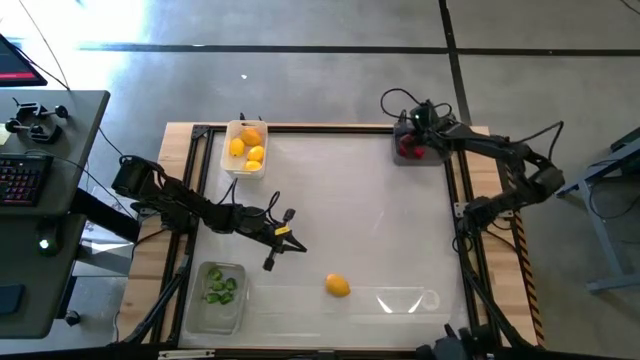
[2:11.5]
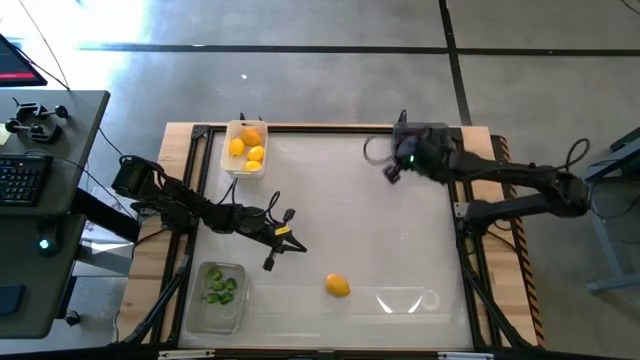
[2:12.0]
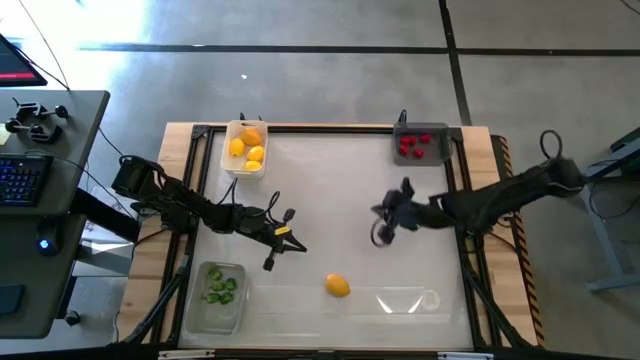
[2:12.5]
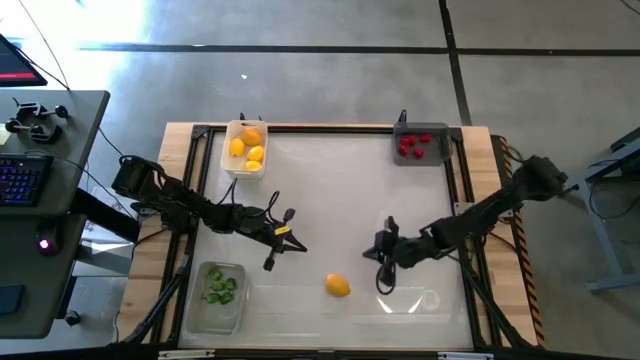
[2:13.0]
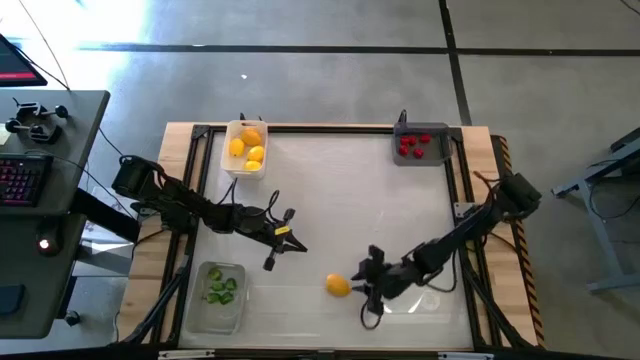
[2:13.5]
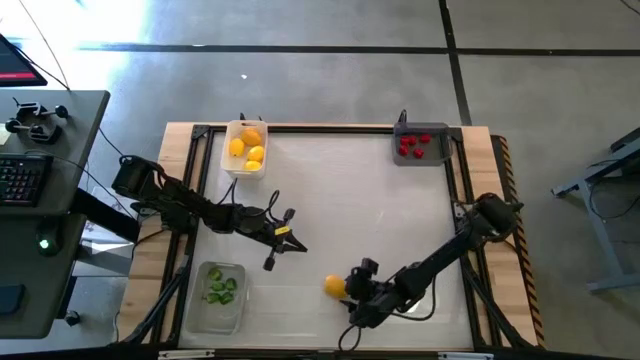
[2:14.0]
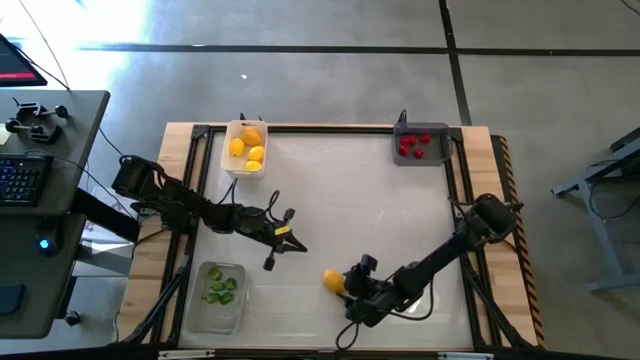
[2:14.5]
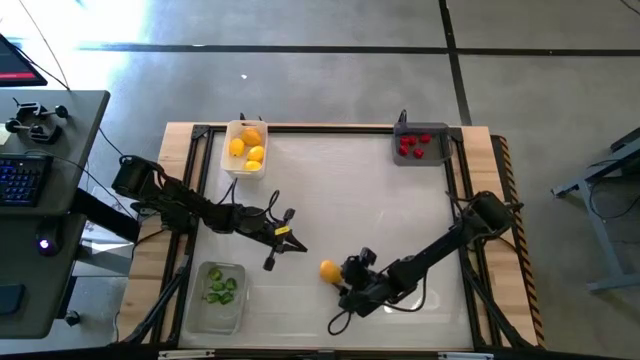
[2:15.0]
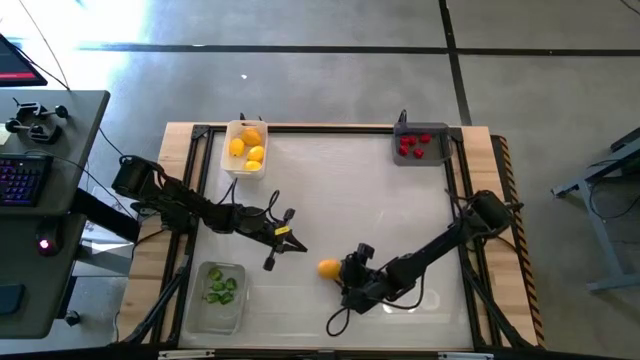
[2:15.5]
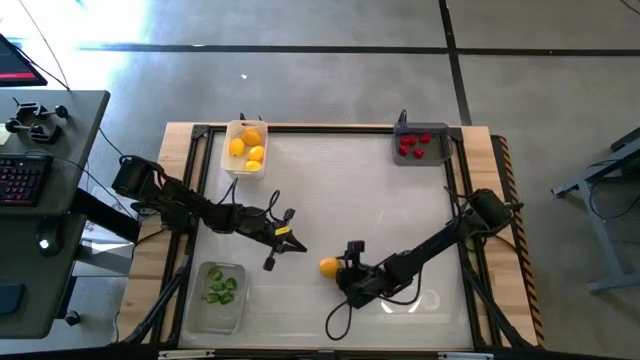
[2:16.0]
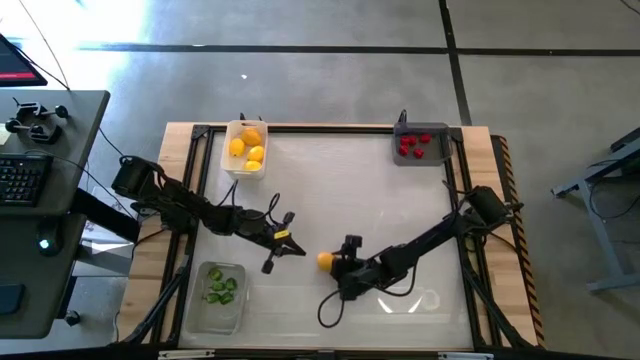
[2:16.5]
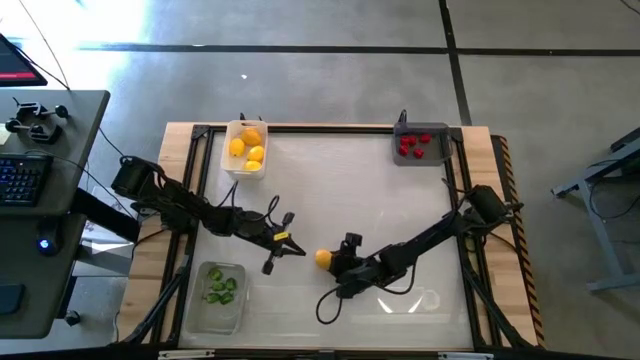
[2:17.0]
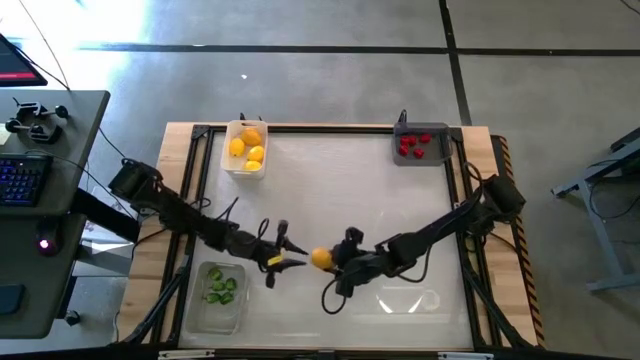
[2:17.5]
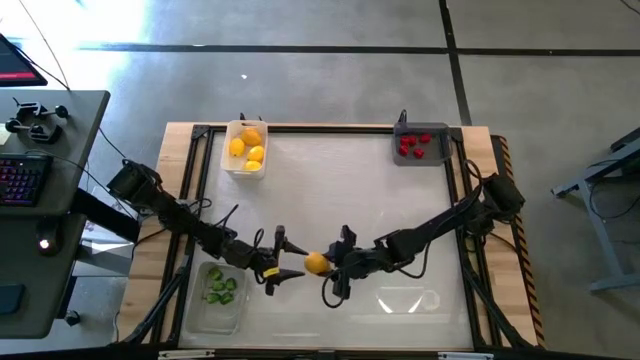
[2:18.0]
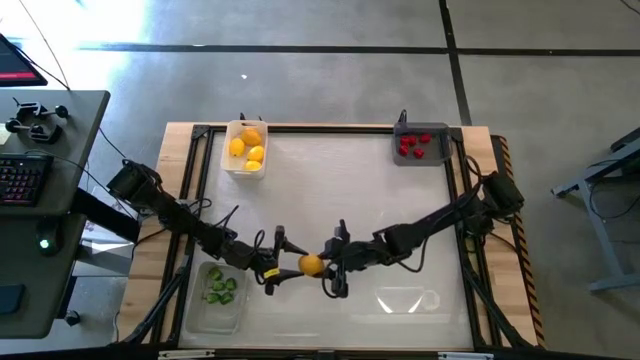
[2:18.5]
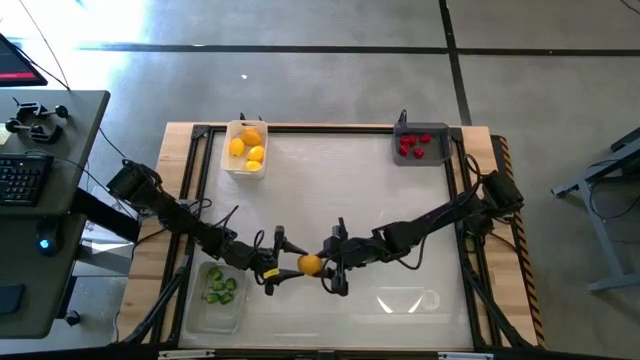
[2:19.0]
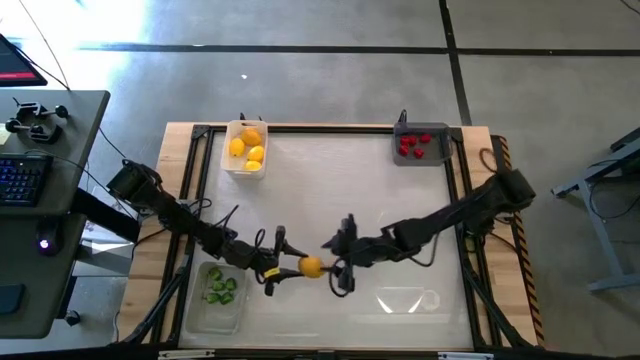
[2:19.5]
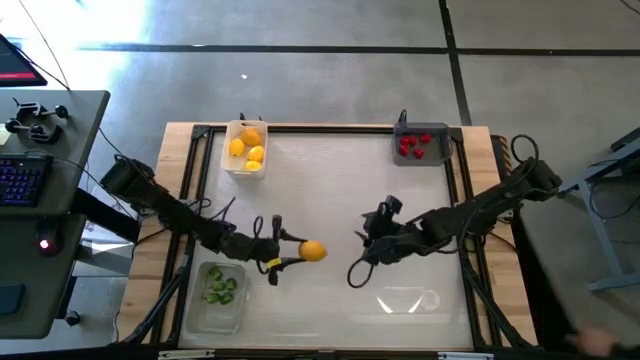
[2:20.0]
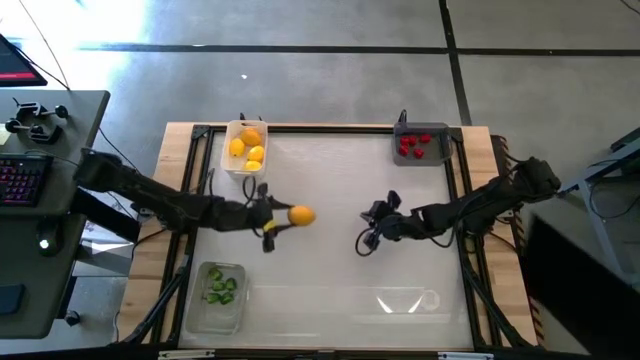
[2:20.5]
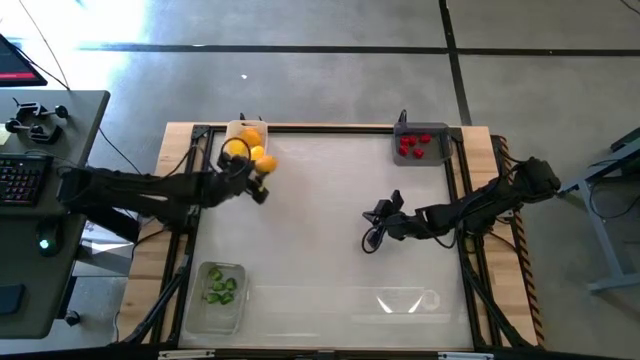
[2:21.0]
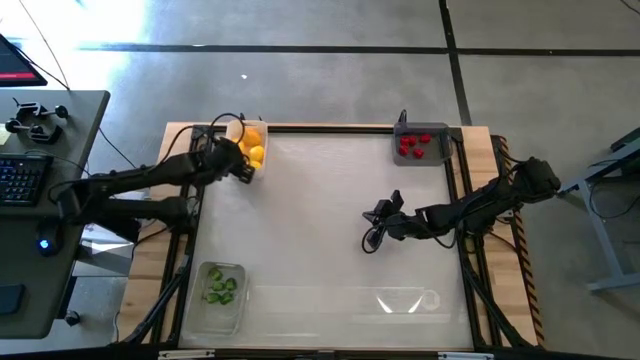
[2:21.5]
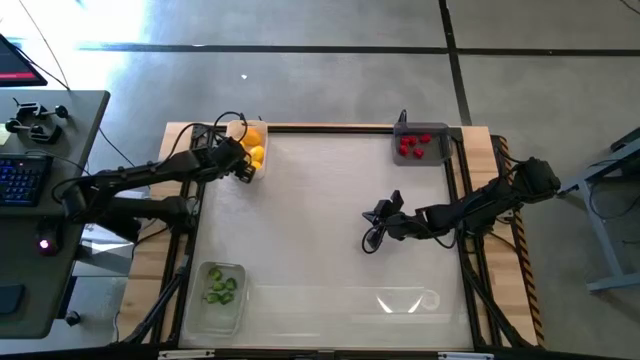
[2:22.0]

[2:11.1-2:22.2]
Task: Sort produce into baskets
Put the lemon into the white bin

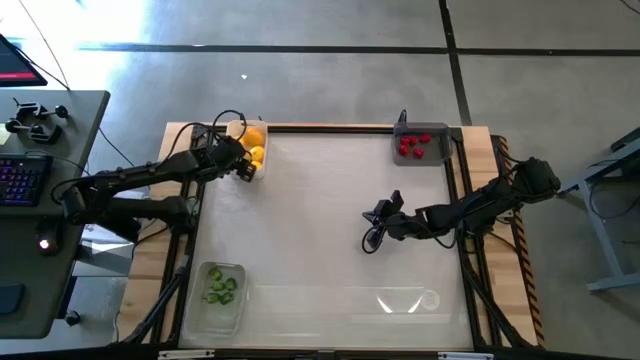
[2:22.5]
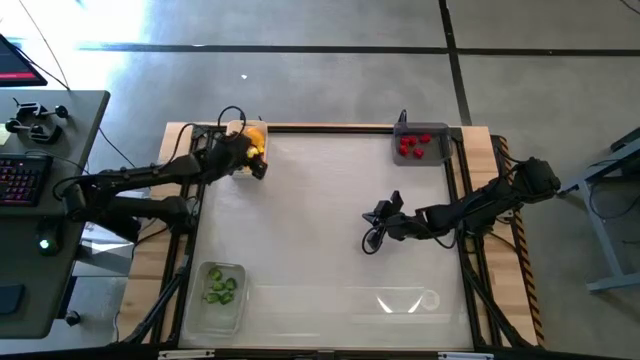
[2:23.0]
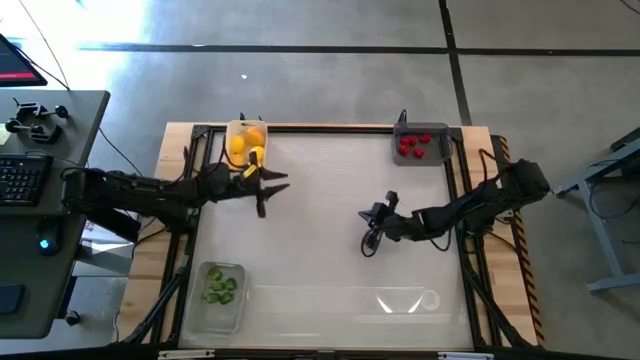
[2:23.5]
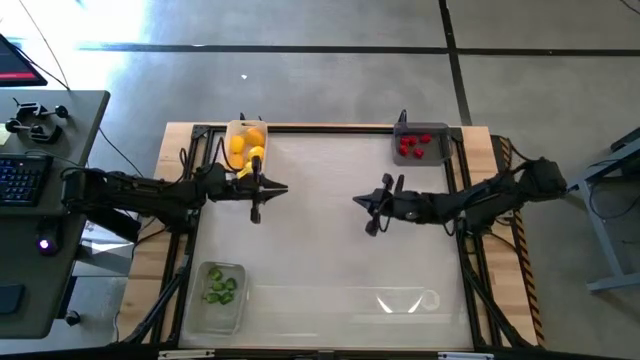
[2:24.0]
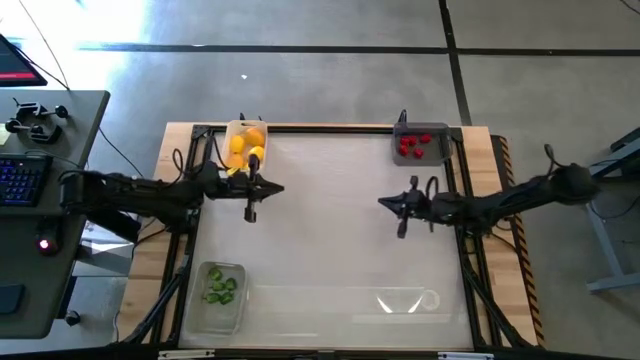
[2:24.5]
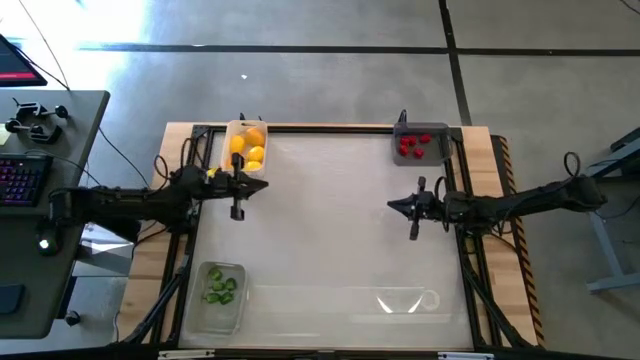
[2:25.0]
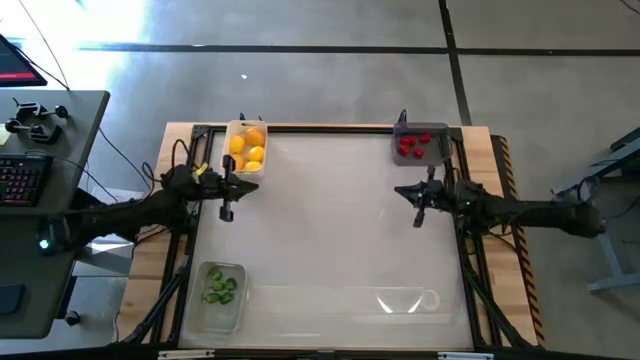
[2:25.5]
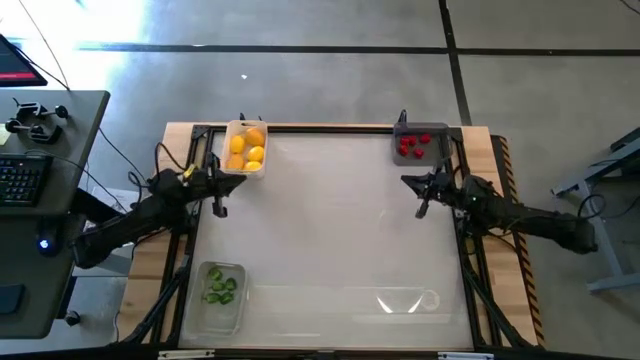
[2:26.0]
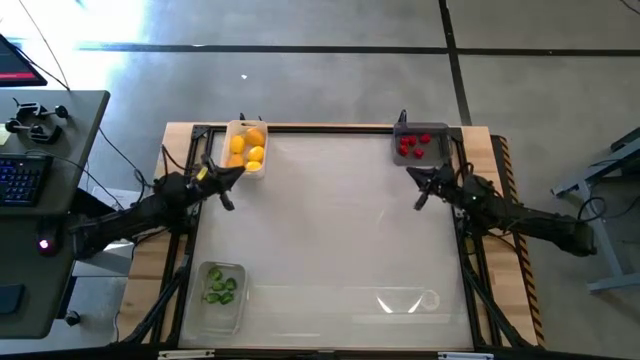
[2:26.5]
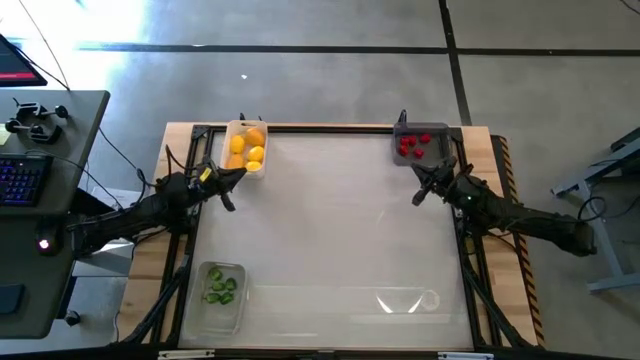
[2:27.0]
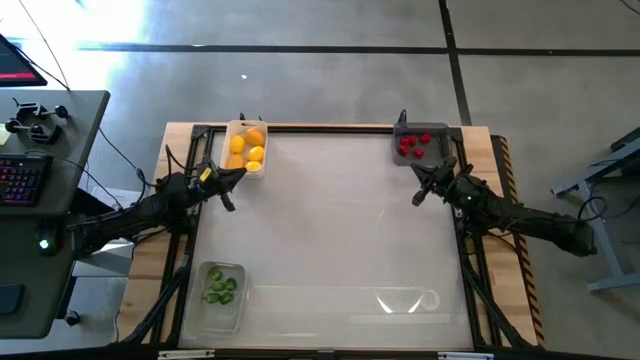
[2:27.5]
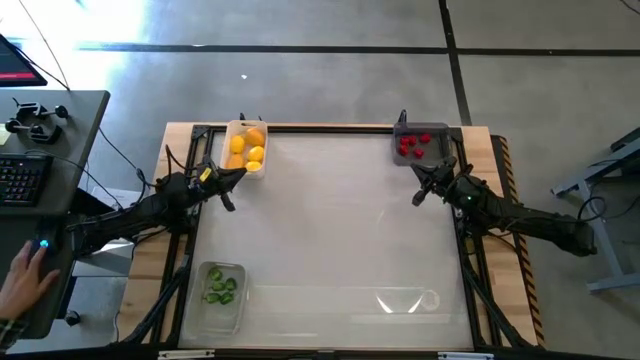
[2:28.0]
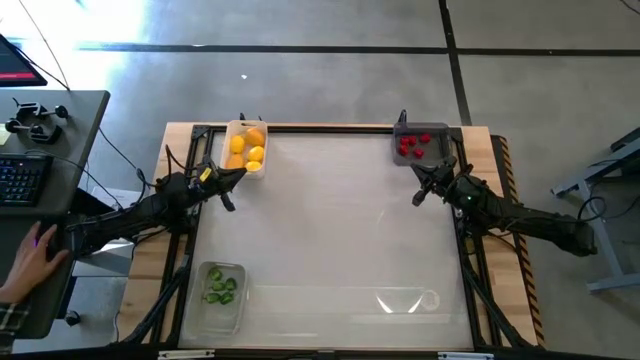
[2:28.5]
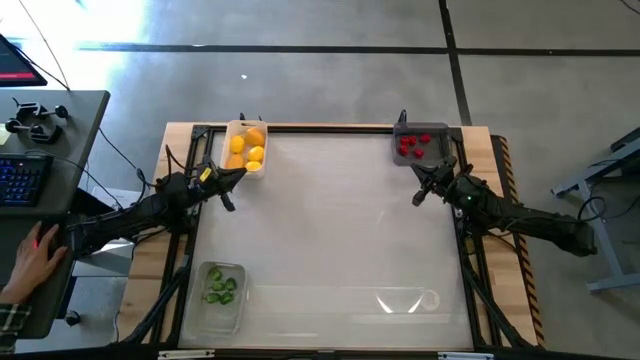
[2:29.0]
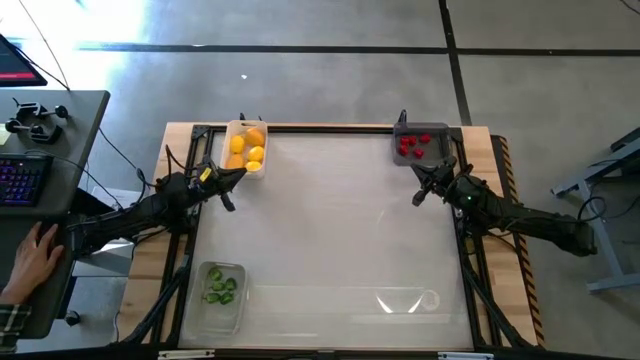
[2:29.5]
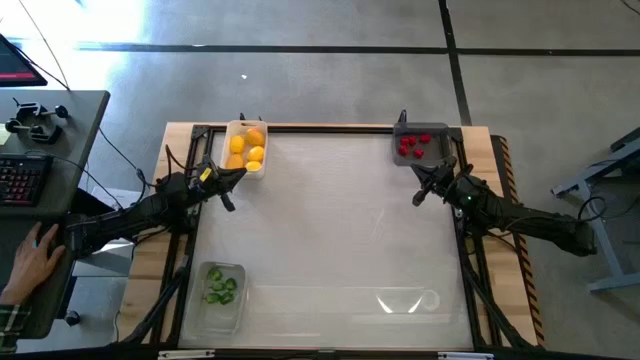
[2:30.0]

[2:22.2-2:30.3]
Return to Home Position
